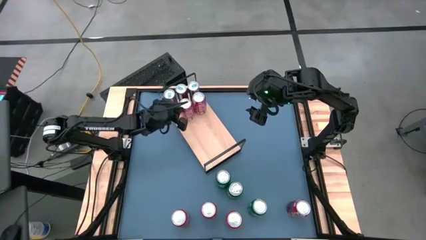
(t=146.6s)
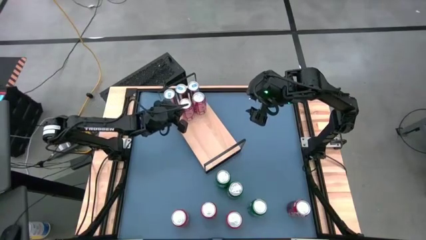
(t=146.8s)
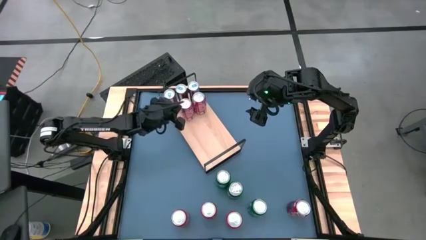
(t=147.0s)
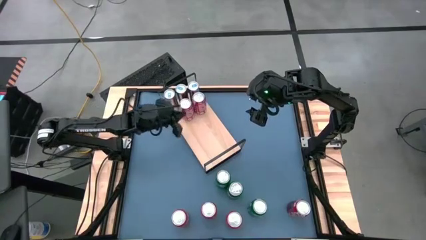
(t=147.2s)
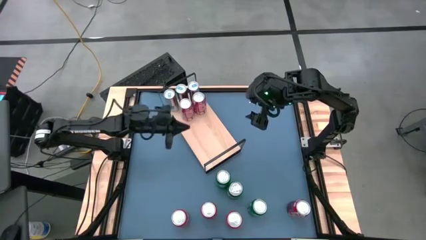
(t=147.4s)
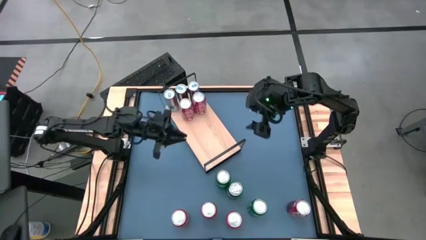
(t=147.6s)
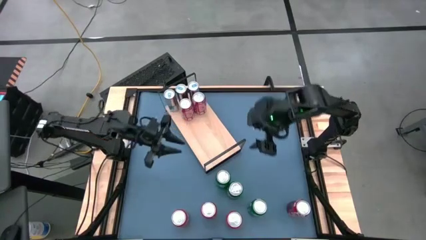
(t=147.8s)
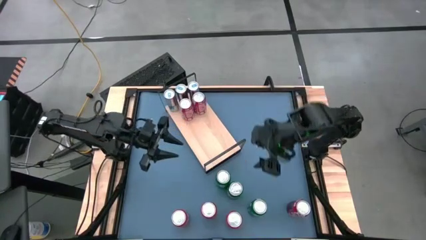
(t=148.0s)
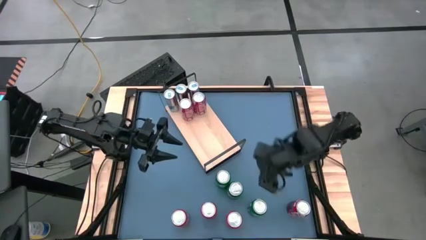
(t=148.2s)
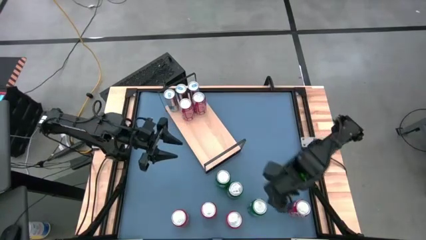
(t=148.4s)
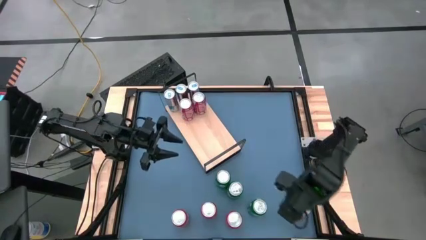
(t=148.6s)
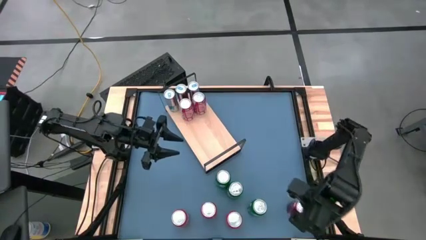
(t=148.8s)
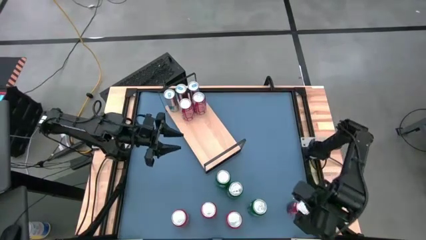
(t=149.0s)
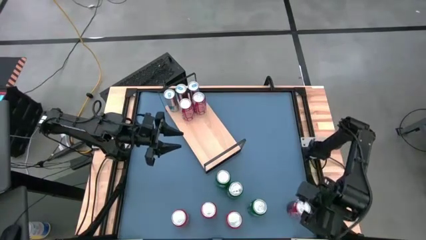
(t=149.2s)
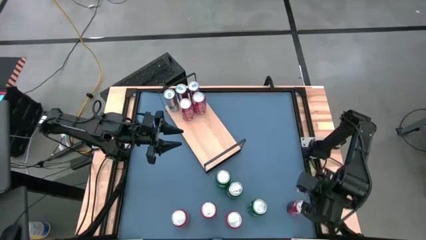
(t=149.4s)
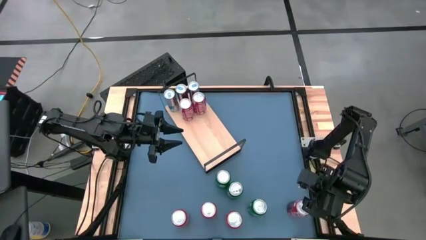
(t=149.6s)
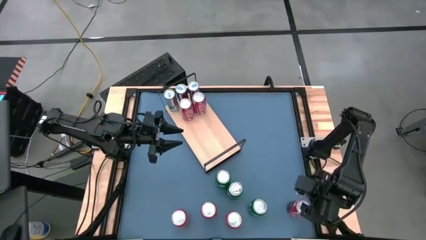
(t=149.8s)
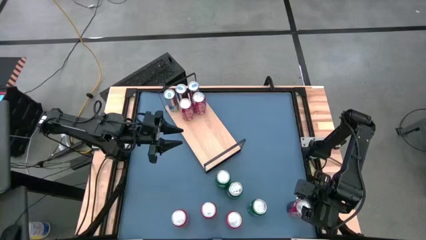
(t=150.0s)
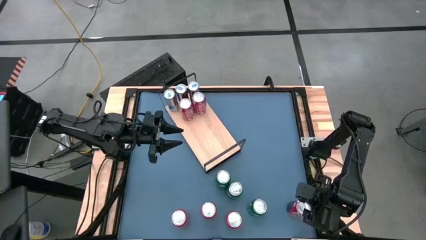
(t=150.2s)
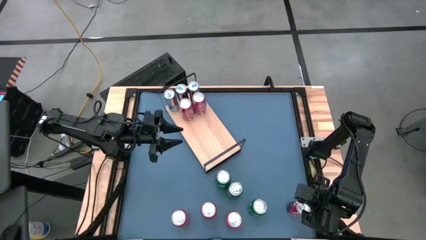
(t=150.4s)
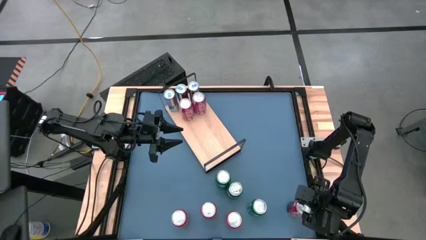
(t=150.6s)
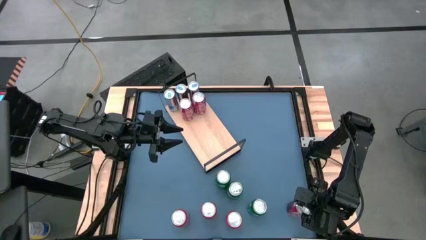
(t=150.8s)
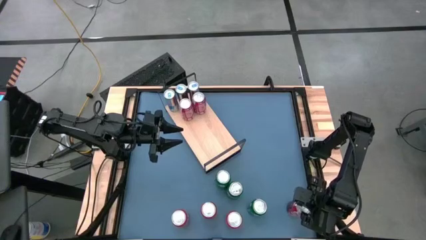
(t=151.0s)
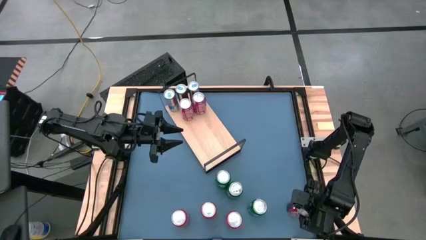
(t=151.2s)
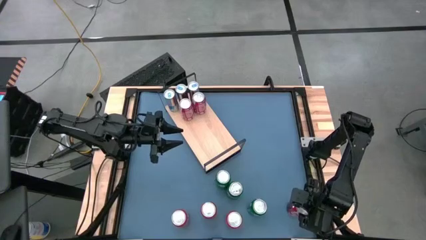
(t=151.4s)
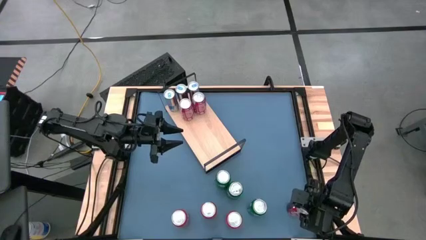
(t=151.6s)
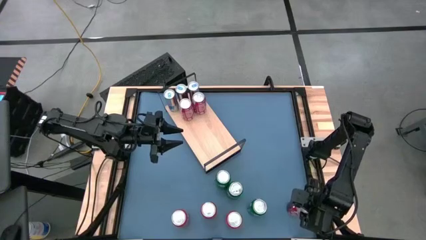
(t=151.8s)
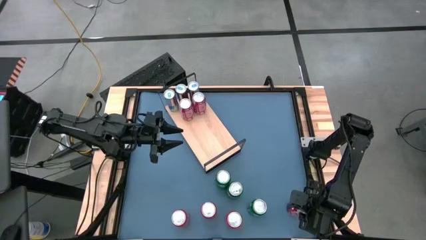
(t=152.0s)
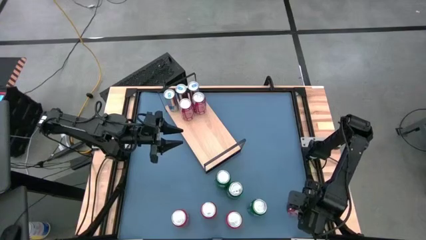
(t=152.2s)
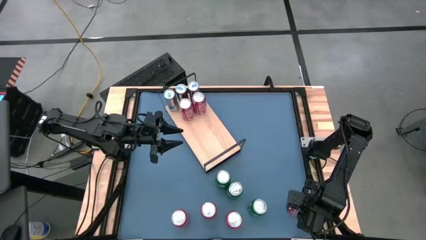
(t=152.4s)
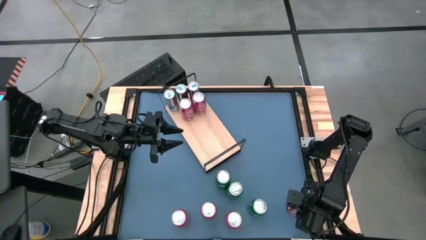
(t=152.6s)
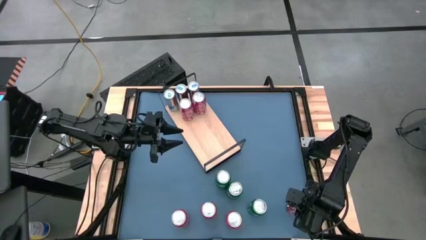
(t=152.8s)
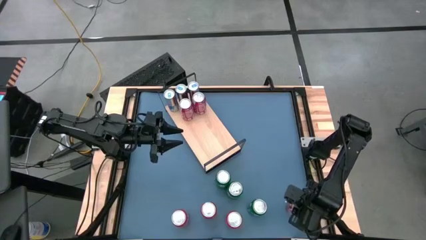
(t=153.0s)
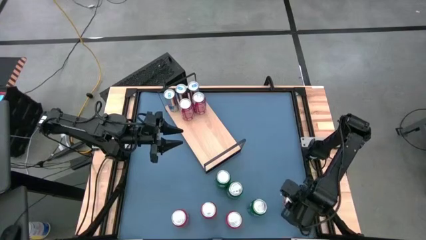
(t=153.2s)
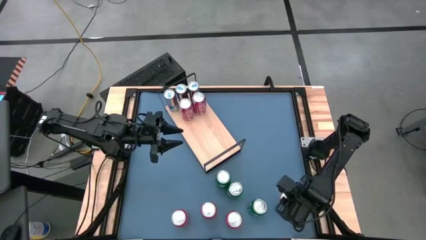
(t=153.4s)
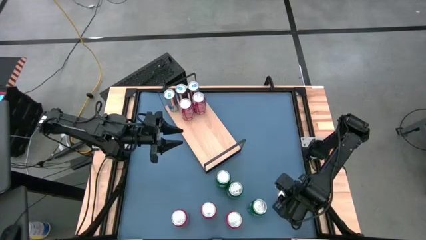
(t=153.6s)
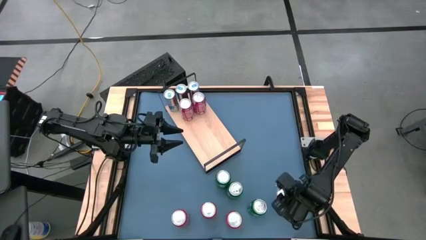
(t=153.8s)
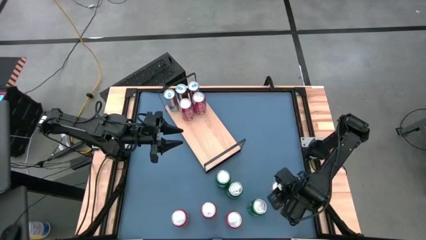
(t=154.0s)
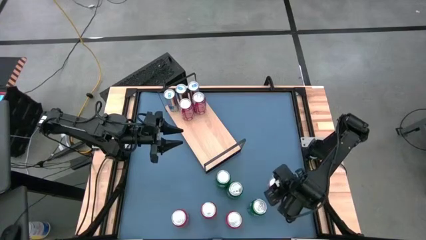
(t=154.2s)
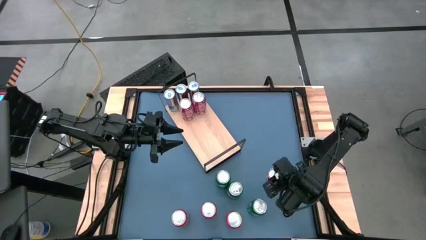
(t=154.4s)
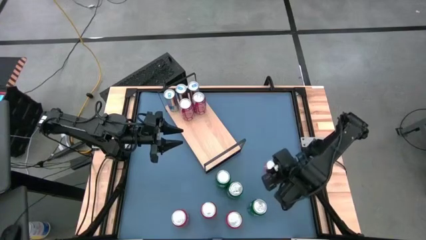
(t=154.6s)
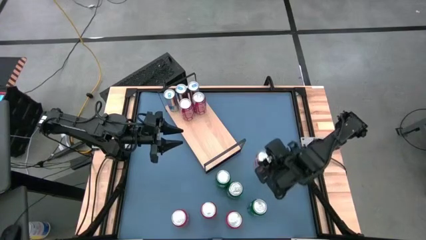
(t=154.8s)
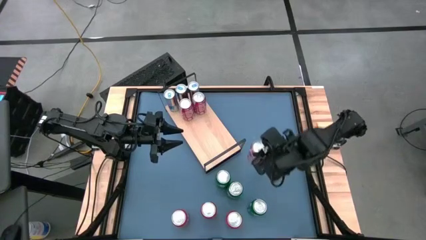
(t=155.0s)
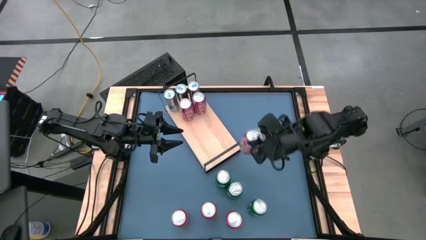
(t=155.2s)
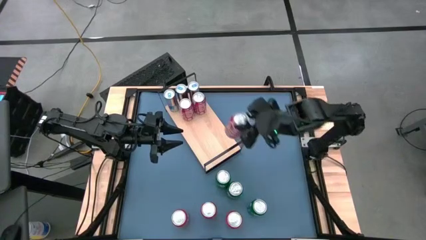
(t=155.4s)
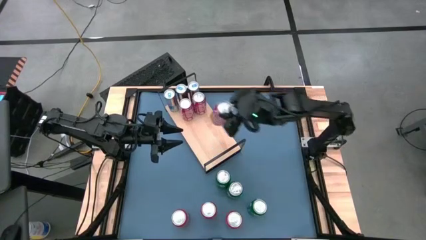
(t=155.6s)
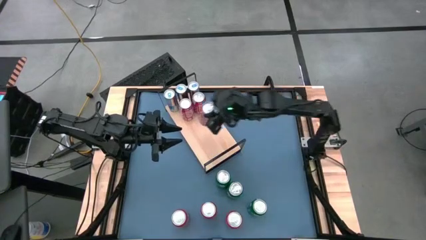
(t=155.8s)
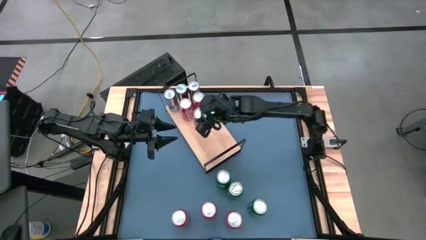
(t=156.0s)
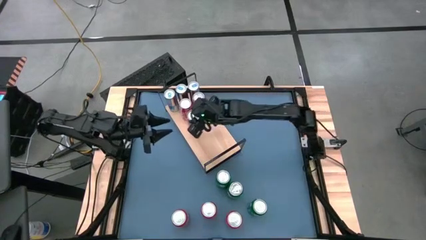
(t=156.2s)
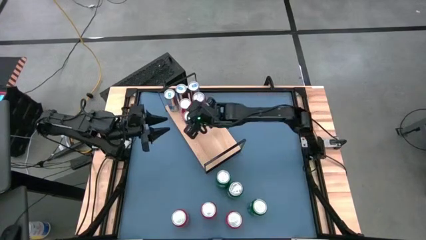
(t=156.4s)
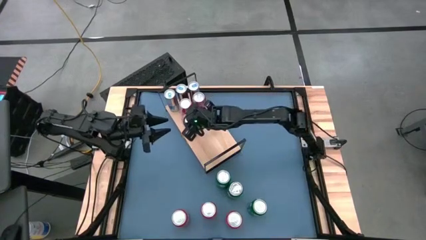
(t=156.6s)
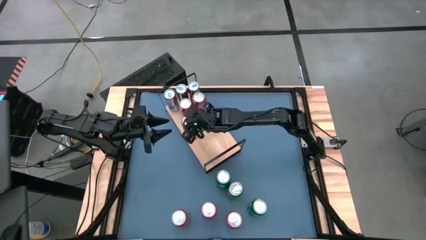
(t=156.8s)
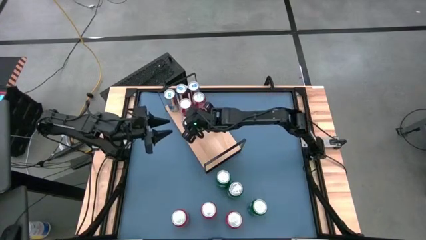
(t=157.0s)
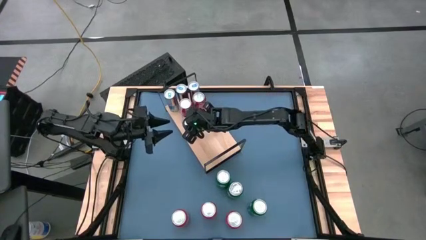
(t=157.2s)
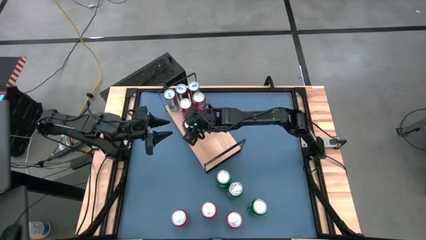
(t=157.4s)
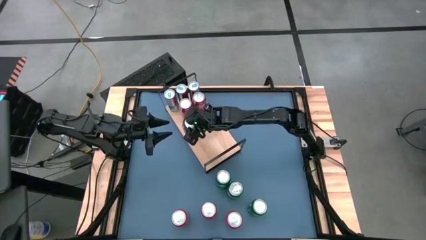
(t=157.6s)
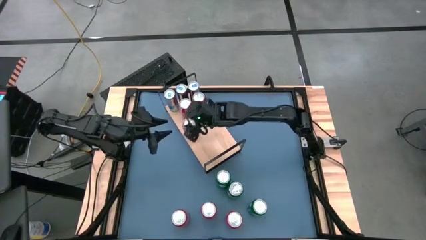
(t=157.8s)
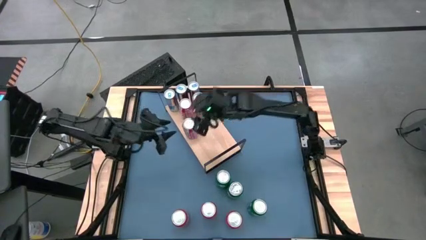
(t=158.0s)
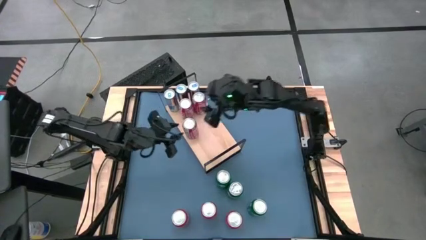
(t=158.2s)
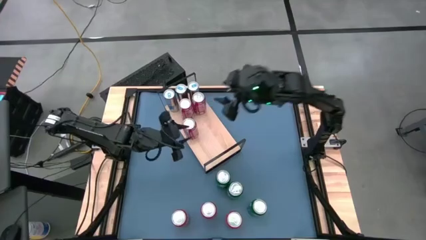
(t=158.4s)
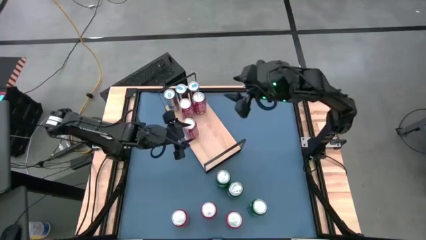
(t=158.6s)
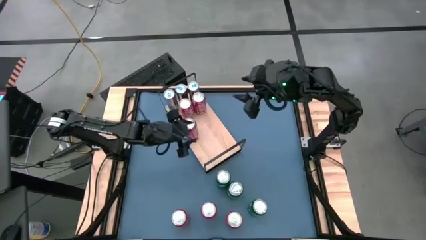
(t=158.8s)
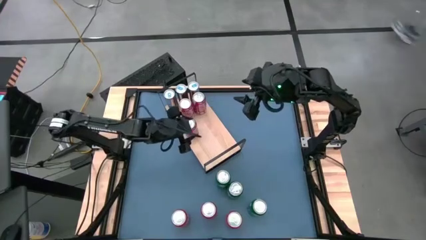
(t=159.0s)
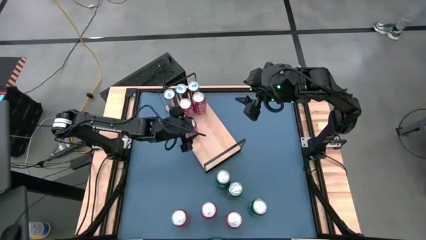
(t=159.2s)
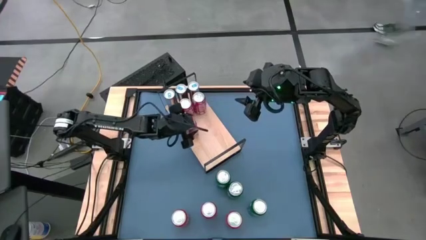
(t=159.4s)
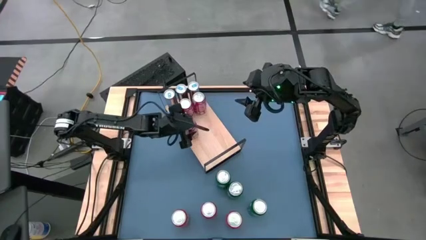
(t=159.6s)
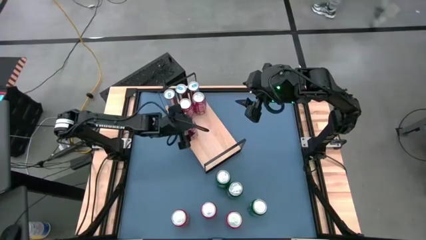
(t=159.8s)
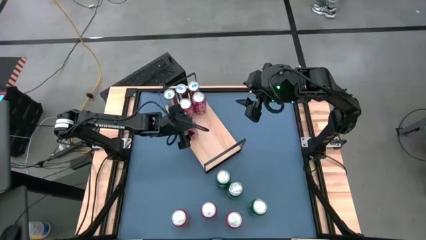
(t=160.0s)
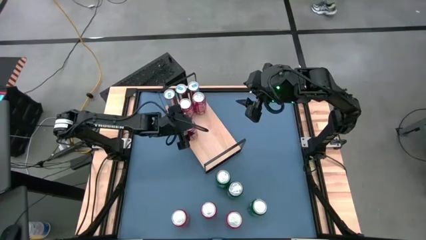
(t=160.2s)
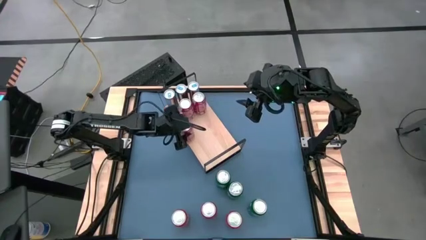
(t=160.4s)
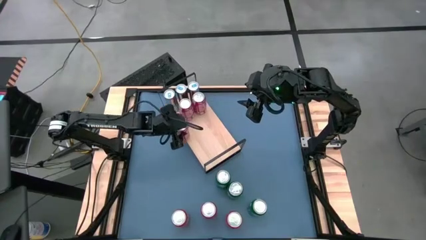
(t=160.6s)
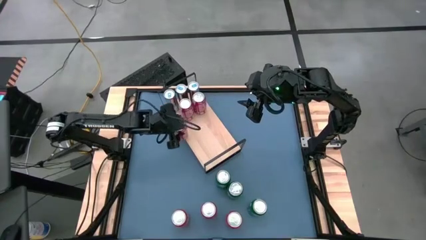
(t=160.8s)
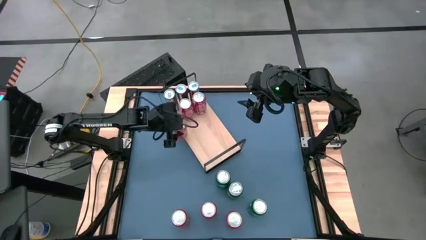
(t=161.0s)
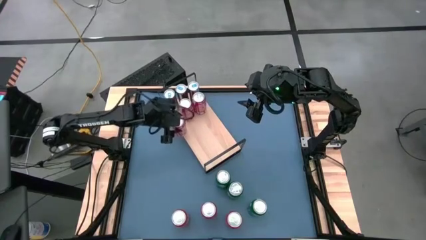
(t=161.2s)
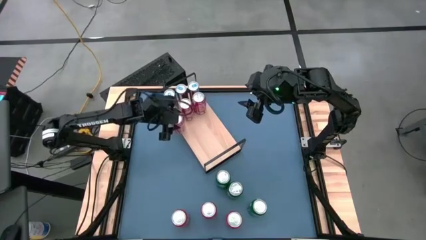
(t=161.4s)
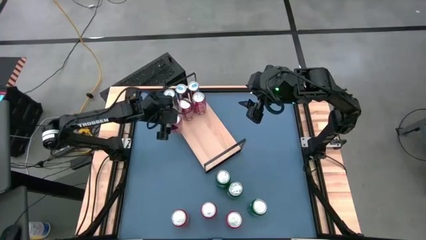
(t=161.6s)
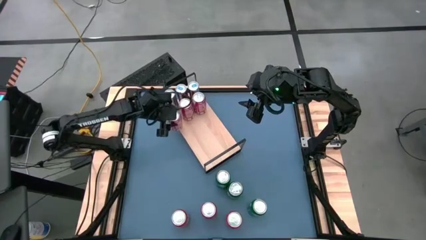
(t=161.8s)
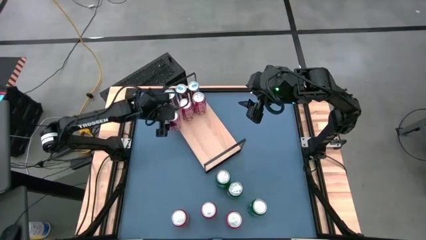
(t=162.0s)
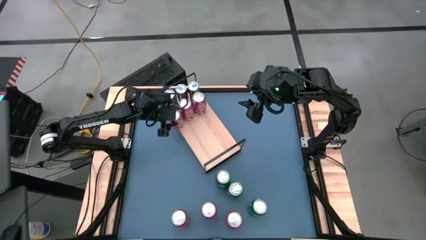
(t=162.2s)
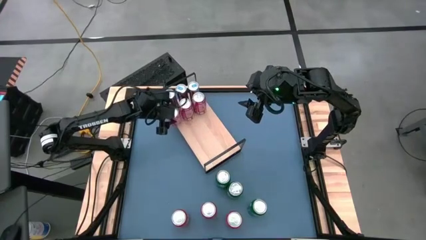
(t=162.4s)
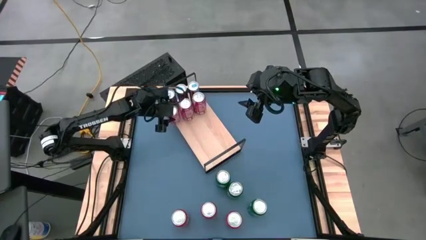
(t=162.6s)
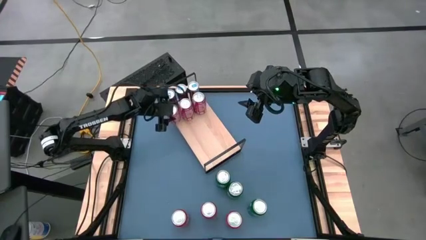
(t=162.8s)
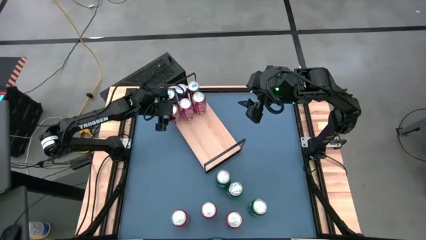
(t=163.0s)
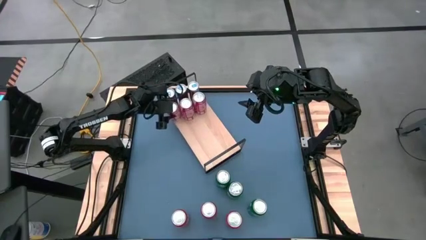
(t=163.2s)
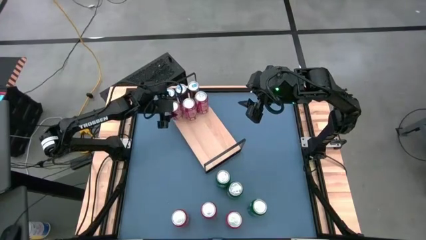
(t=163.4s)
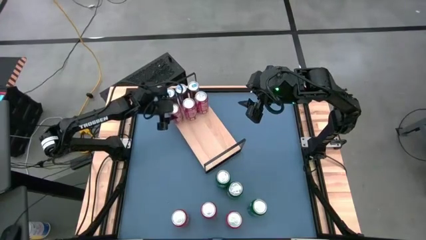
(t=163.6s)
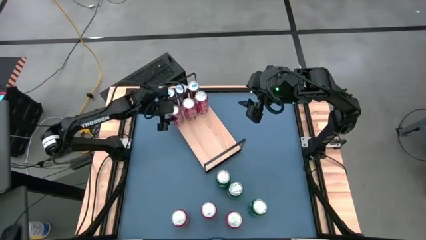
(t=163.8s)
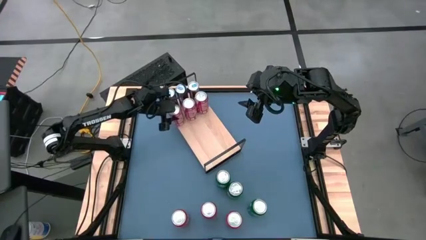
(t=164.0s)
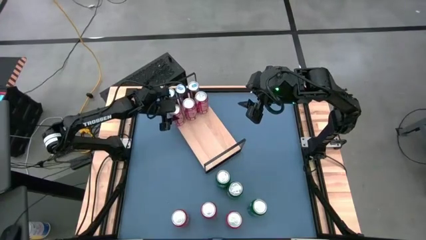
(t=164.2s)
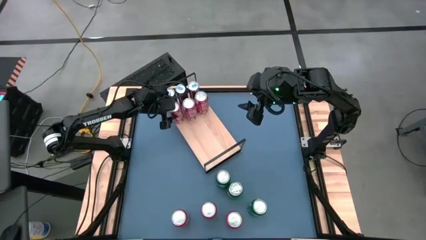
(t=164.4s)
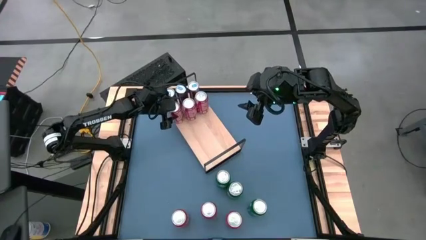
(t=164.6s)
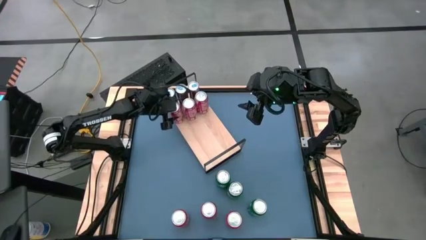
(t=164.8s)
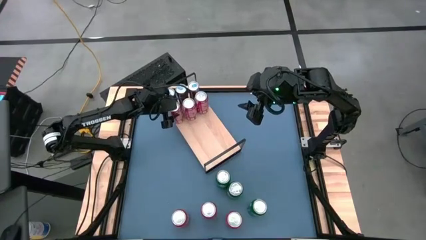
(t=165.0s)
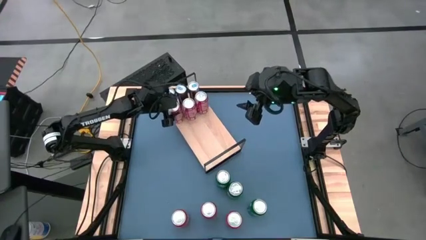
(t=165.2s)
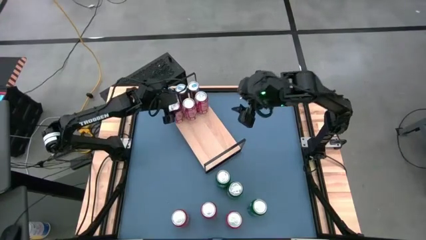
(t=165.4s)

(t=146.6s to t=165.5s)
Task: Place canned beverage on shelf
Put the red white soda can on the shelf aligned with the other red white soda cans
